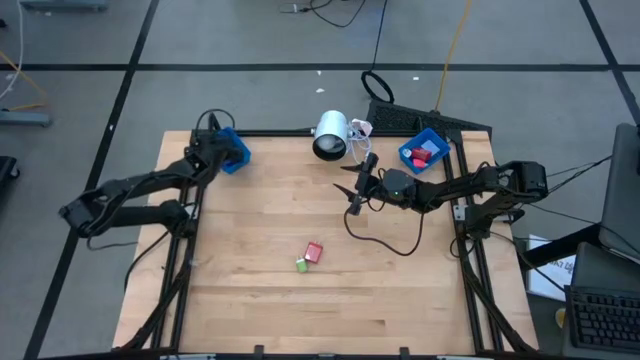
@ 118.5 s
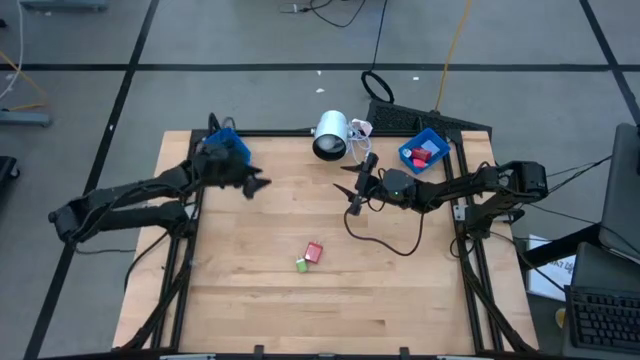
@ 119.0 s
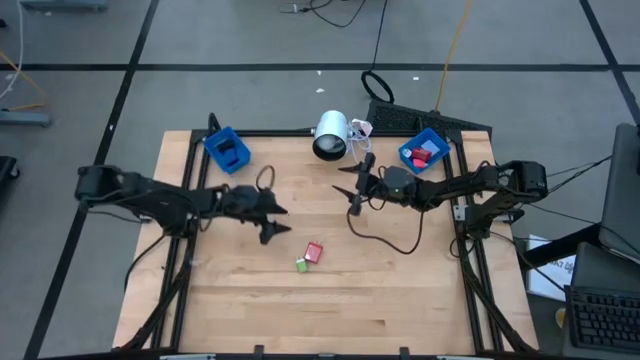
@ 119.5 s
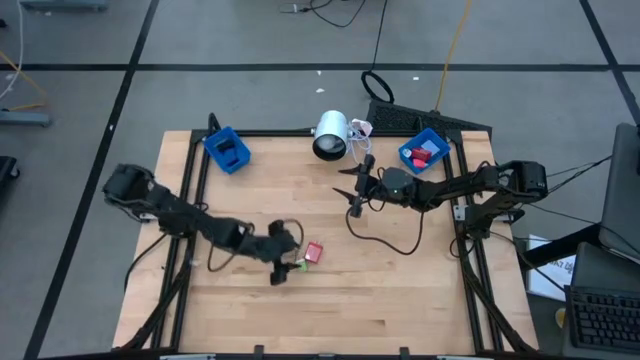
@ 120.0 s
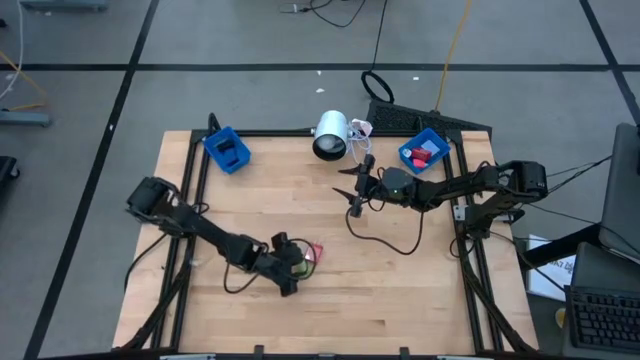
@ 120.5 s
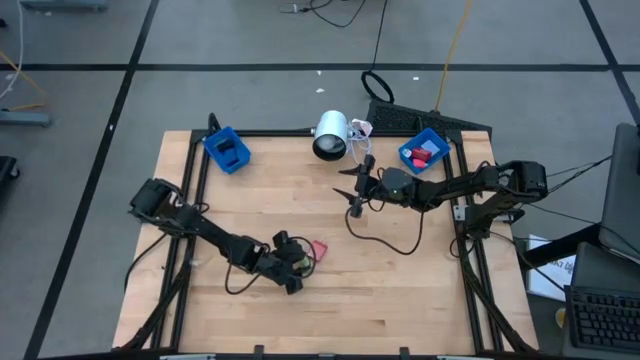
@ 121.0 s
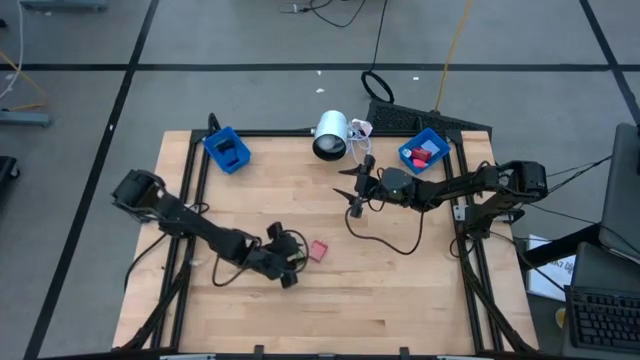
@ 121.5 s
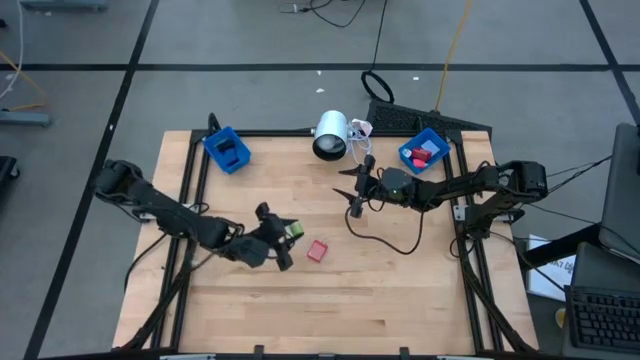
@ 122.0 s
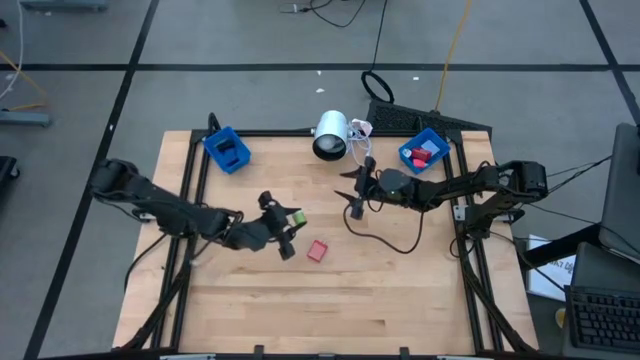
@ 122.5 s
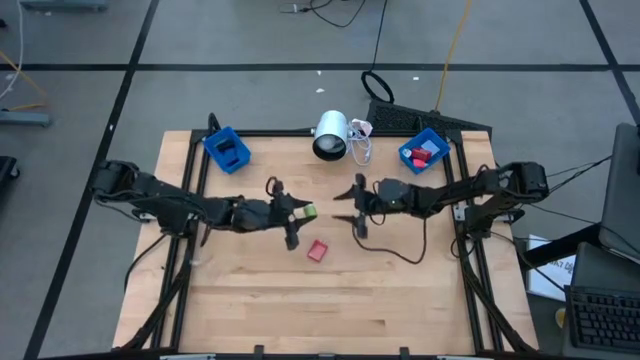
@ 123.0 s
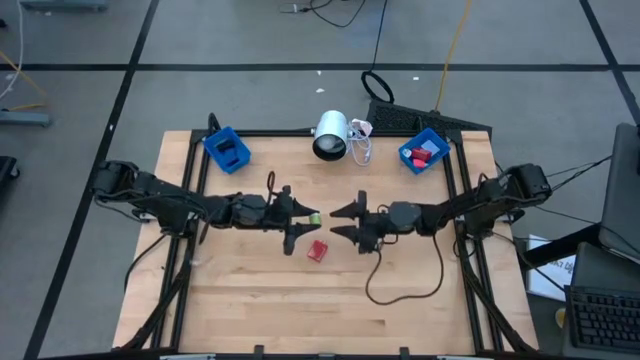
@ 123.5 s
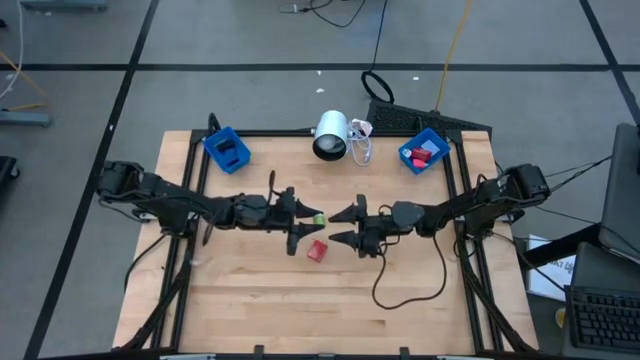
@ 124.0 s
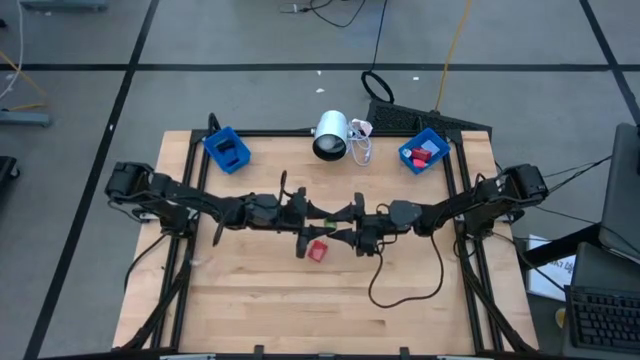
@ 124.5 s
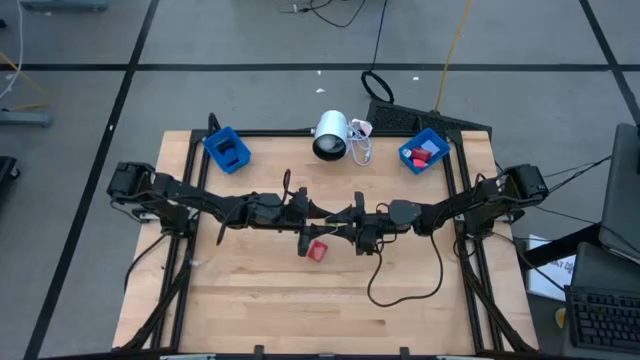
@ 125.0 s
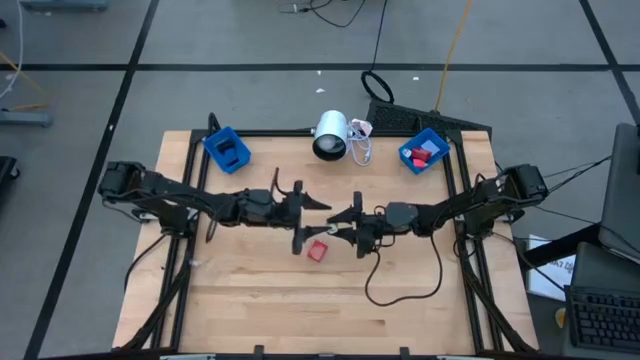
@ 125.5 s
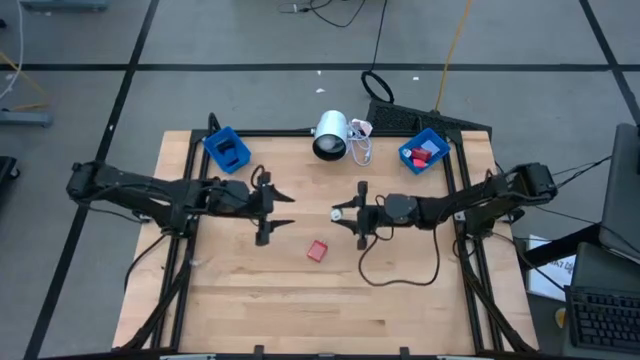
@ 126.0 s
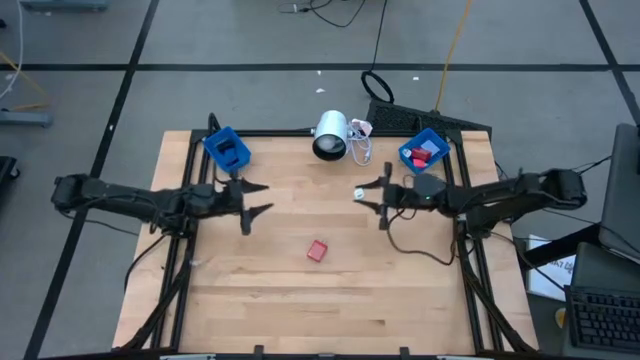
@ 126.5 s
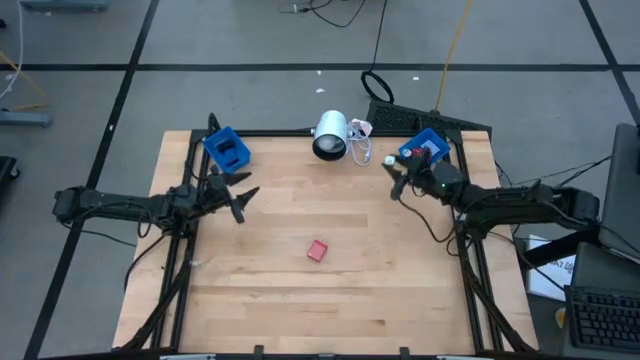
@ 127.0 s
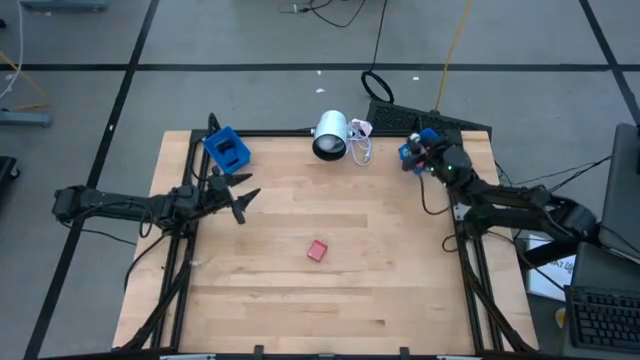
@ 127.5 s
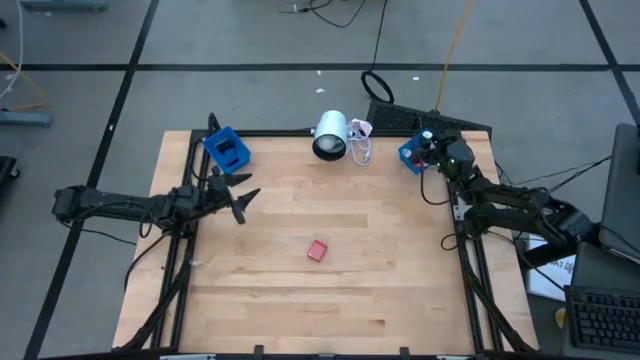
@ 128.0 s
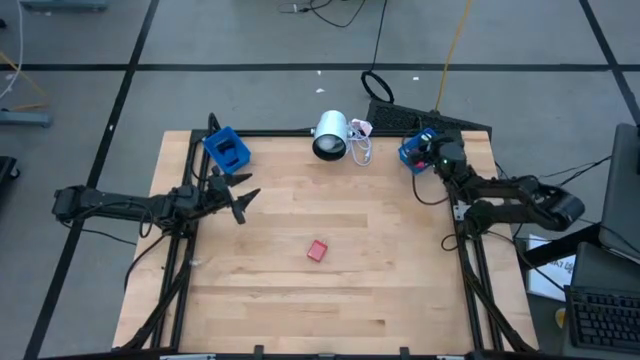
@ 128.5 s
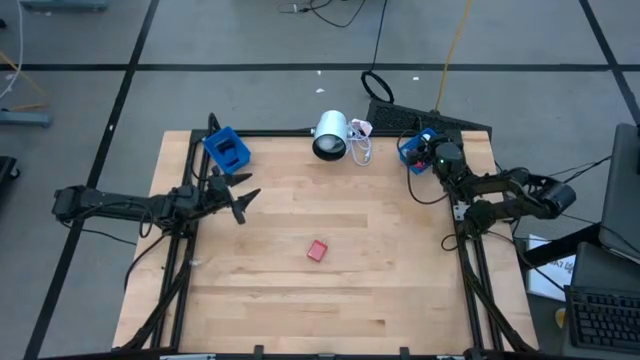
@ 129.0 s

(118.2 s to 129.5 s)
Task: Pick & Place Office items
Put the green charger adapter into the right blue bin

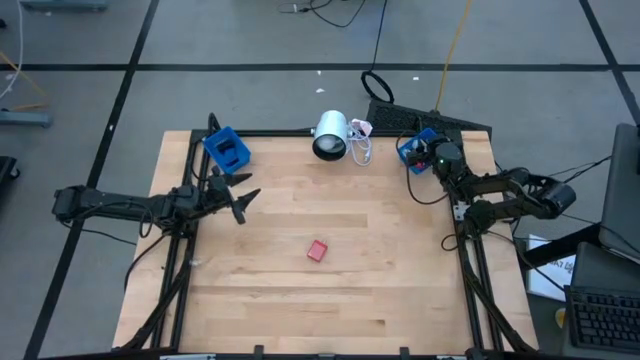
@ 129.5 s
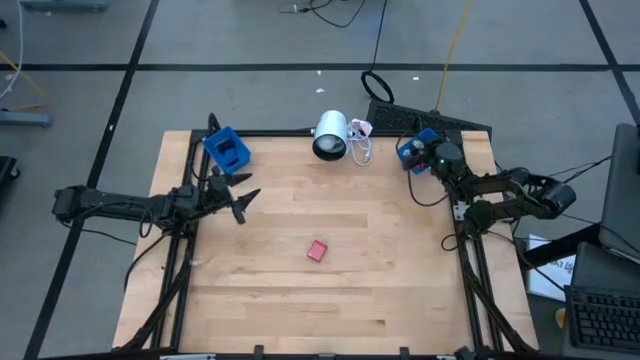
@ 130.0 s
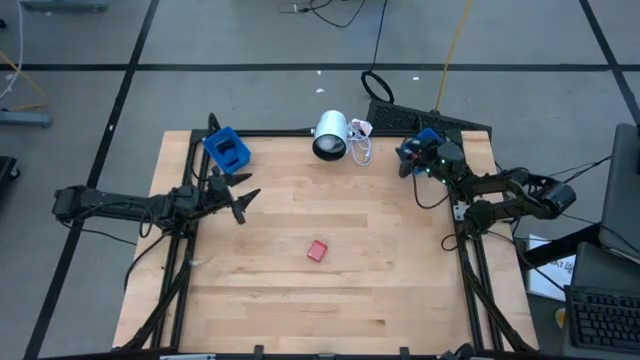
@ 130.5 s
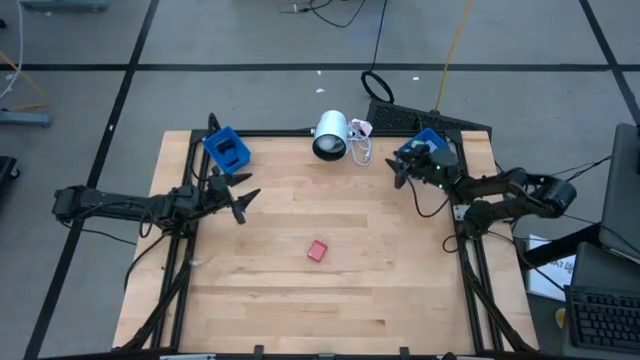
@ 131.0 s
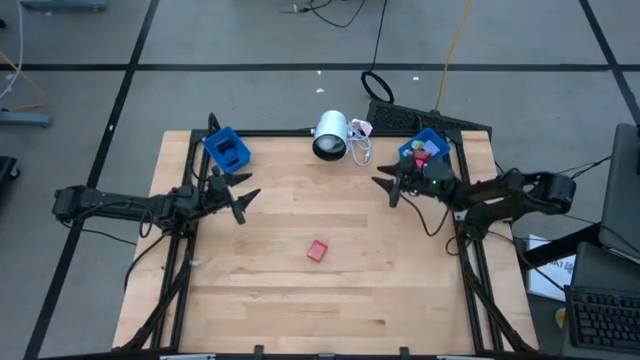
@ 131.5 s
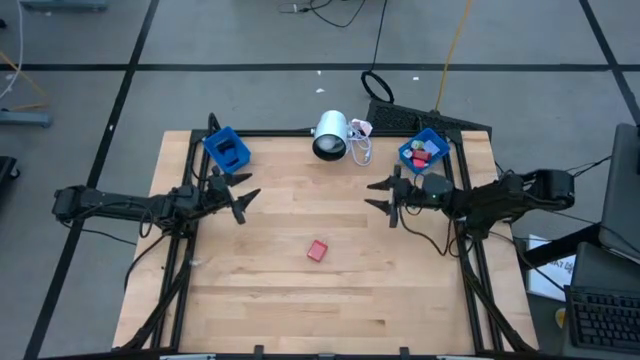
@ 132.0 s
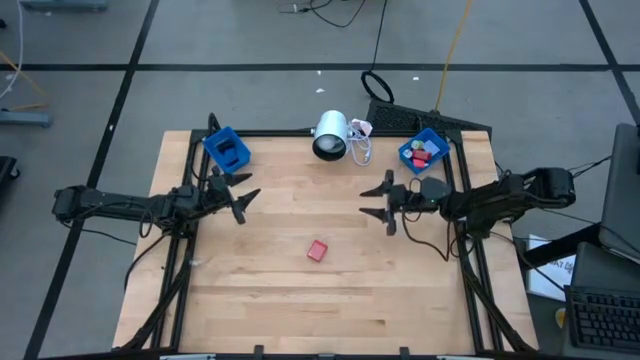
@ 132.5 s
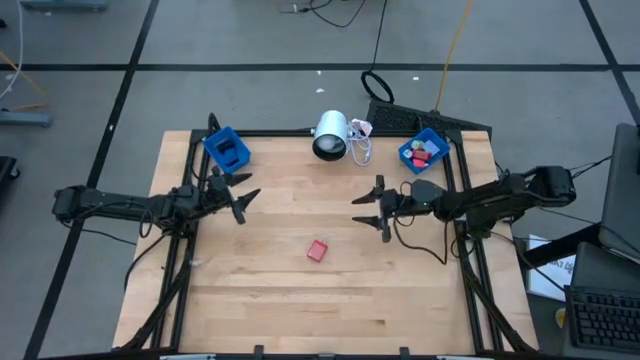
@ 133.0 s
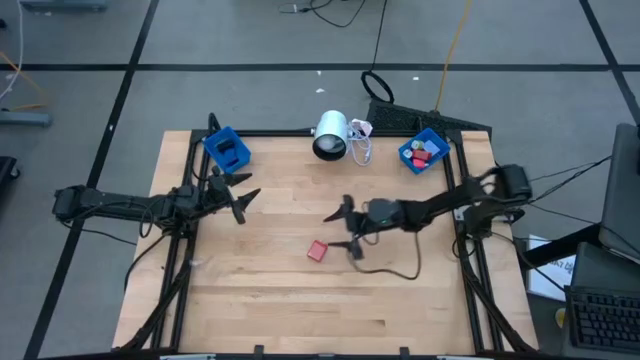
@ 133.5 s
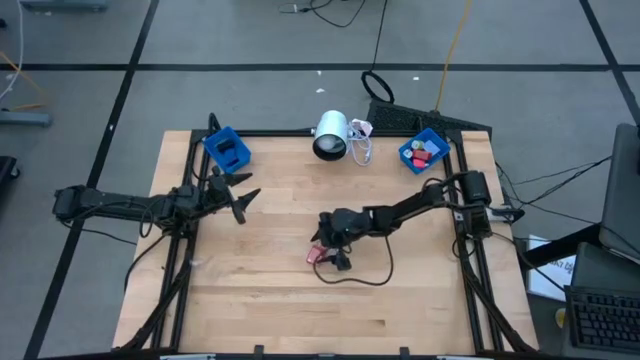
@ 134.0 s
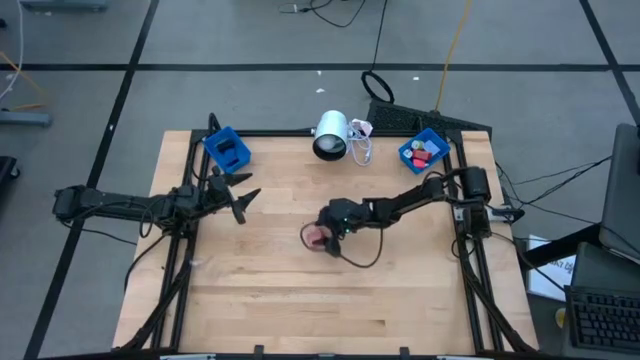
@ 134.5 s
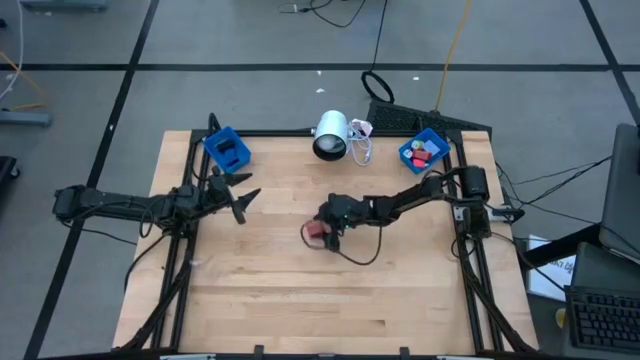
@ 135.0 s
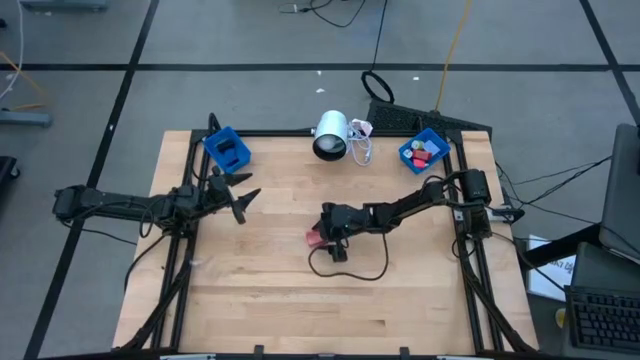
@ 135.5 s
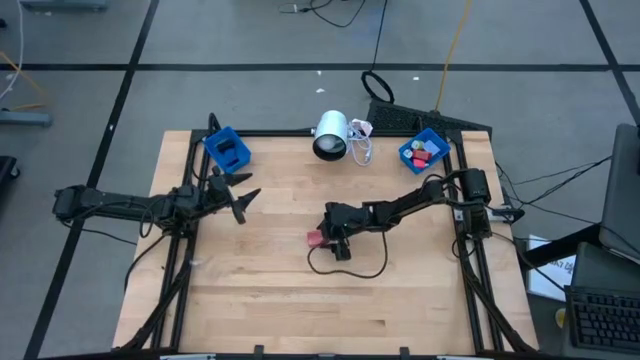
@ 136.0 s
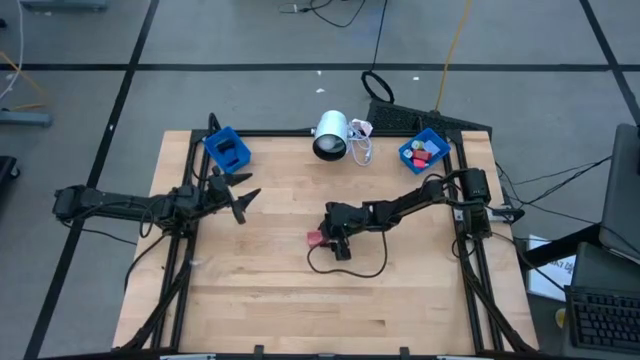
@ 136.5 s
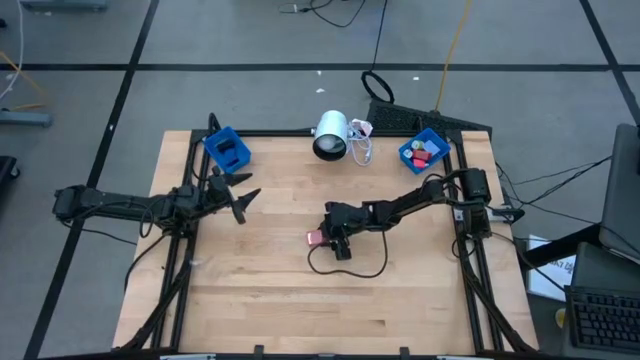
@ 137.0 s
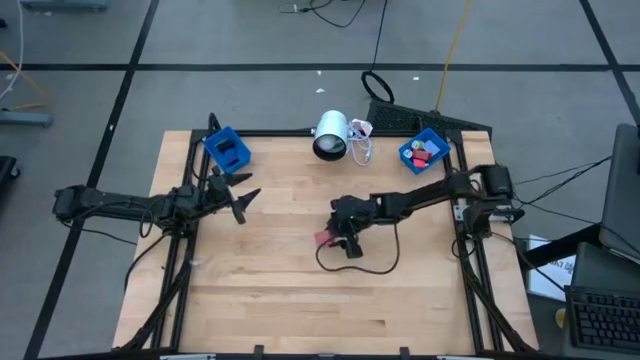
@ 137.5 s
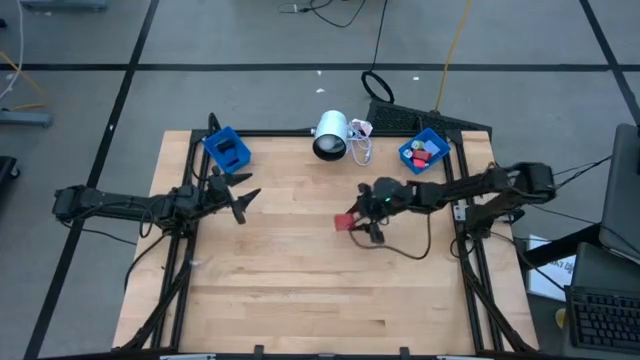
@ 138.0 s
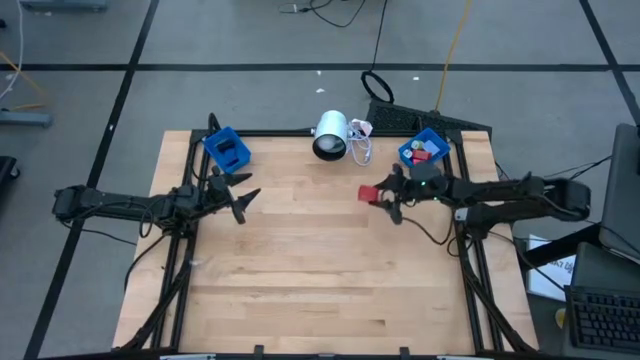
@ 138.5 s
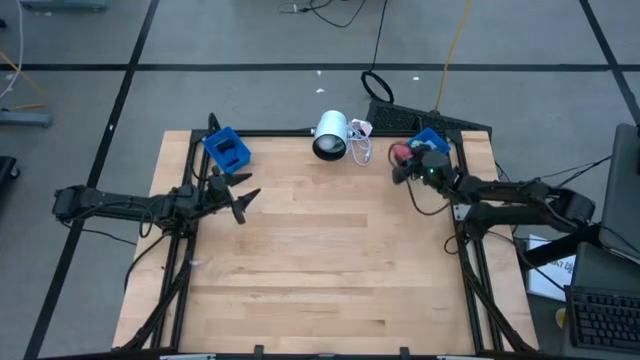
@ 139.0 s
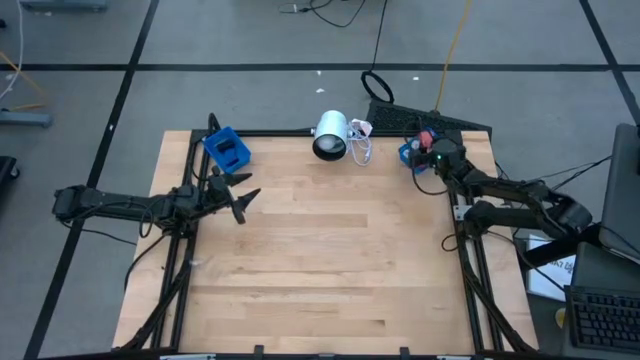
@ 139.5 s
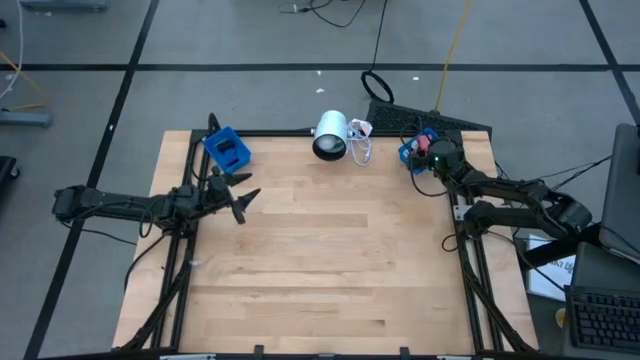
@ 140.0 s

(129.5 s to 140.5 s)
Put the red charger adapter into the right blue bin
